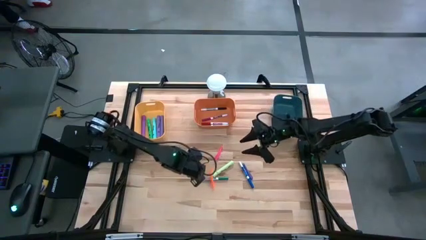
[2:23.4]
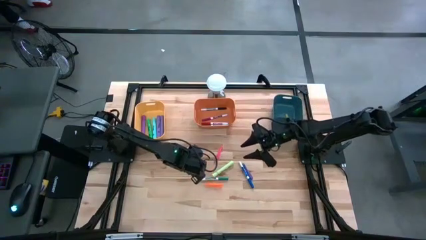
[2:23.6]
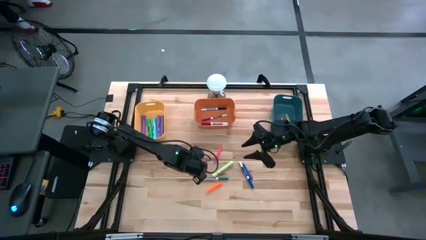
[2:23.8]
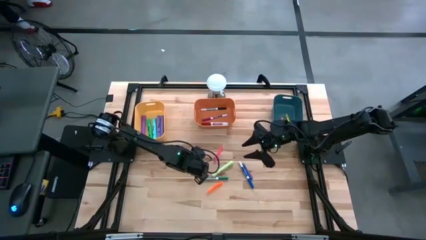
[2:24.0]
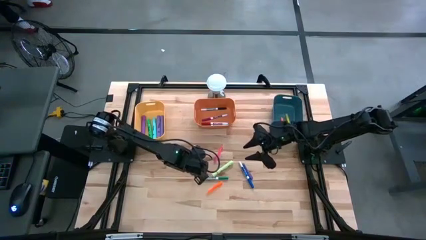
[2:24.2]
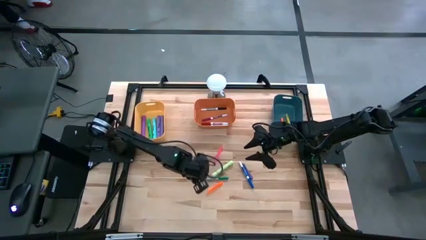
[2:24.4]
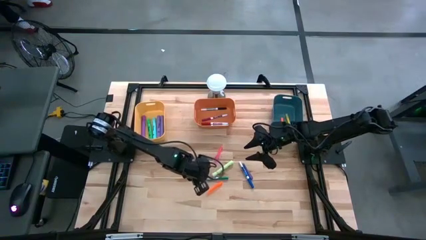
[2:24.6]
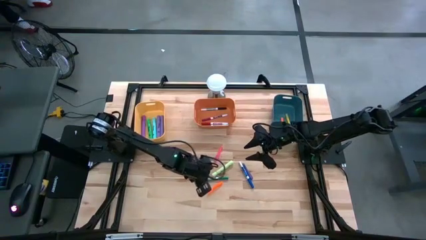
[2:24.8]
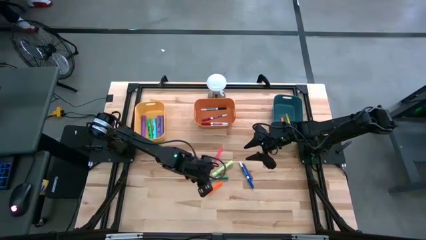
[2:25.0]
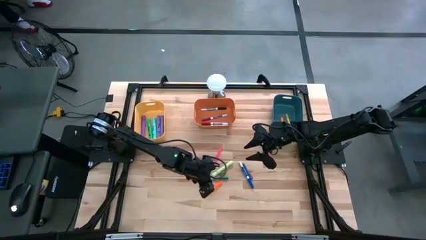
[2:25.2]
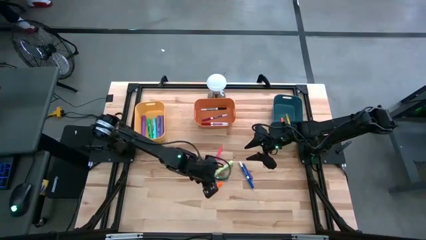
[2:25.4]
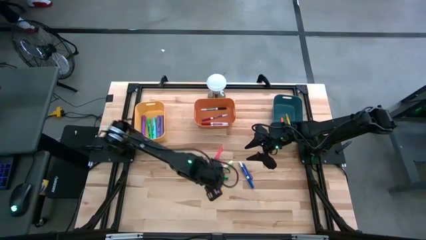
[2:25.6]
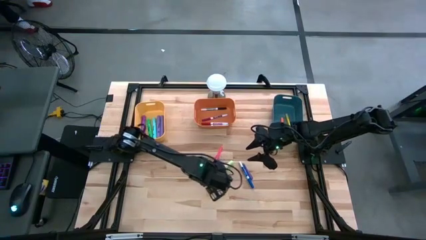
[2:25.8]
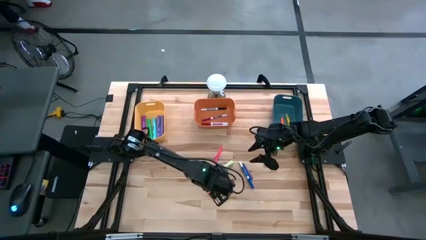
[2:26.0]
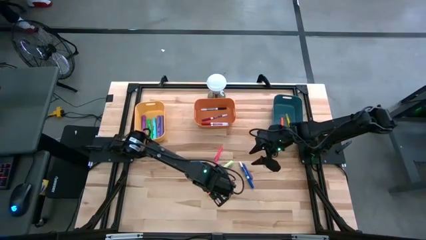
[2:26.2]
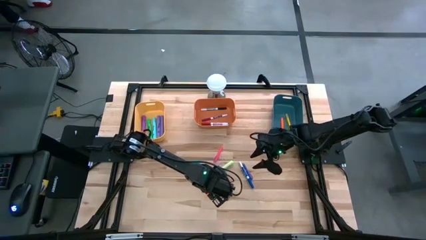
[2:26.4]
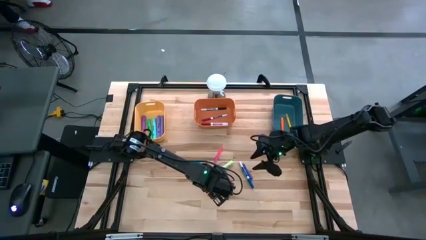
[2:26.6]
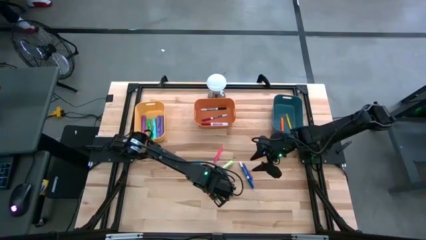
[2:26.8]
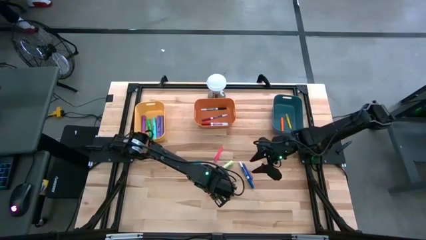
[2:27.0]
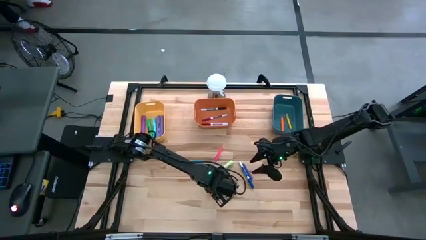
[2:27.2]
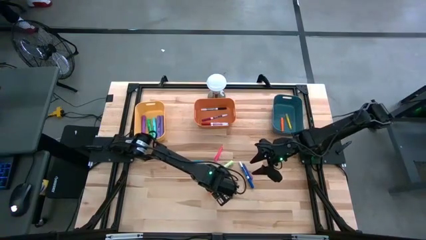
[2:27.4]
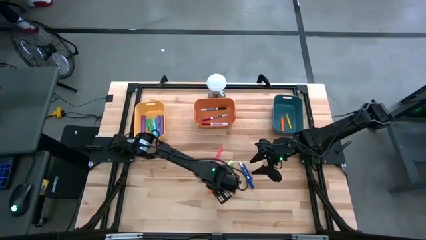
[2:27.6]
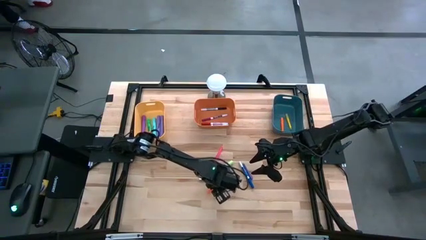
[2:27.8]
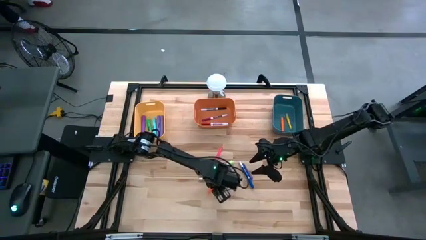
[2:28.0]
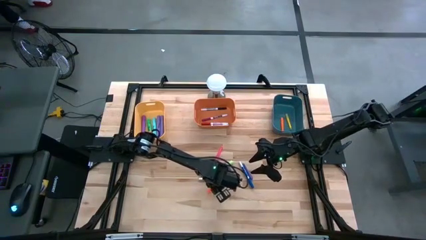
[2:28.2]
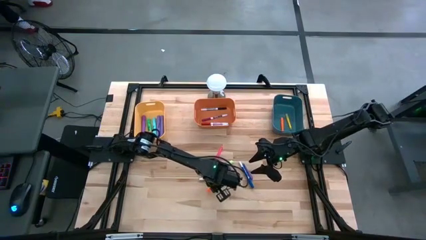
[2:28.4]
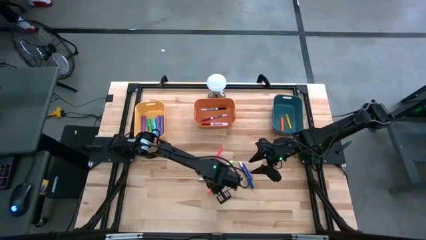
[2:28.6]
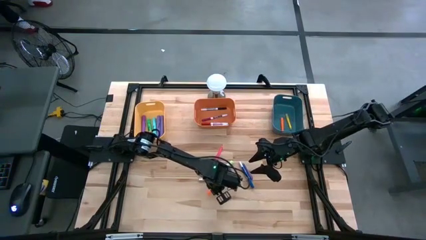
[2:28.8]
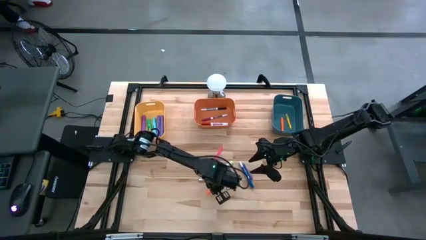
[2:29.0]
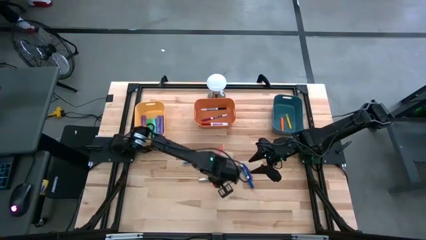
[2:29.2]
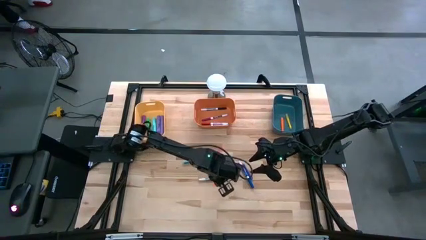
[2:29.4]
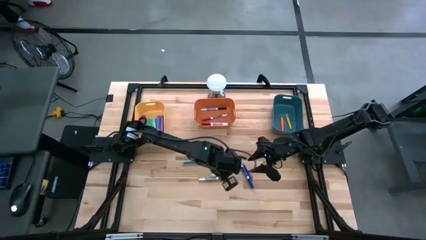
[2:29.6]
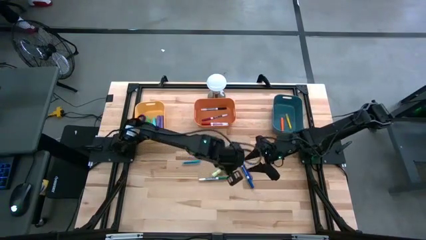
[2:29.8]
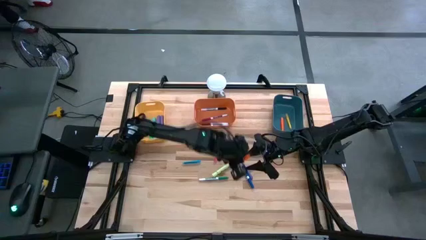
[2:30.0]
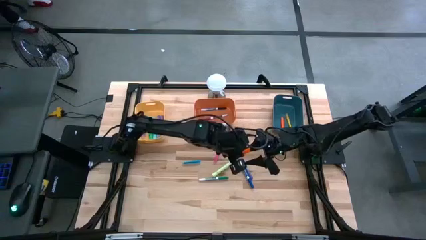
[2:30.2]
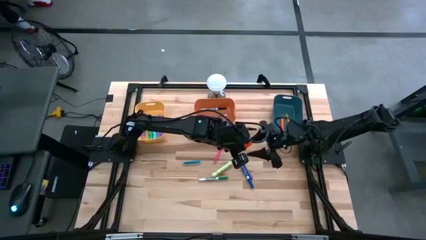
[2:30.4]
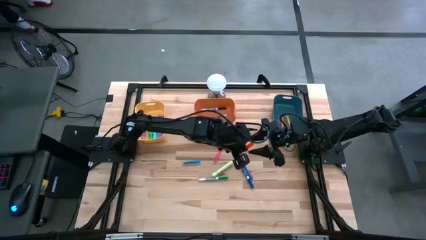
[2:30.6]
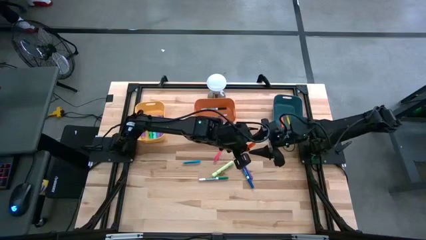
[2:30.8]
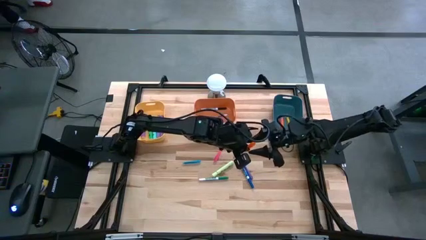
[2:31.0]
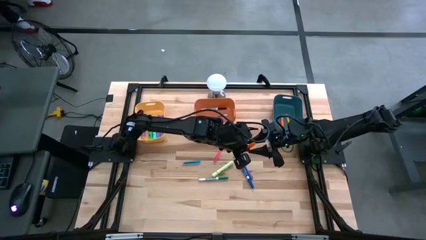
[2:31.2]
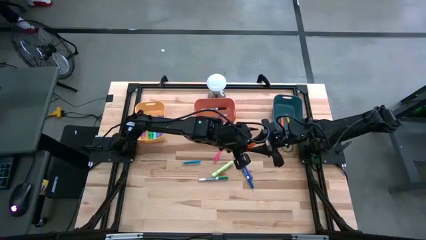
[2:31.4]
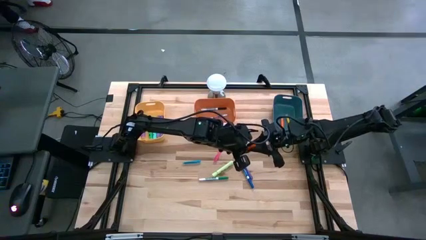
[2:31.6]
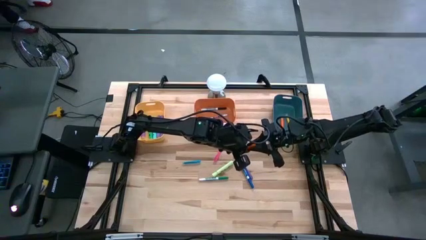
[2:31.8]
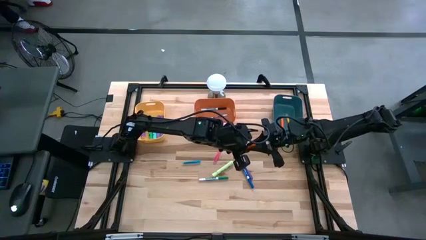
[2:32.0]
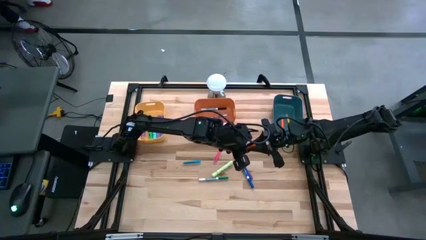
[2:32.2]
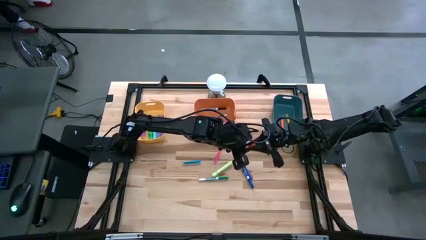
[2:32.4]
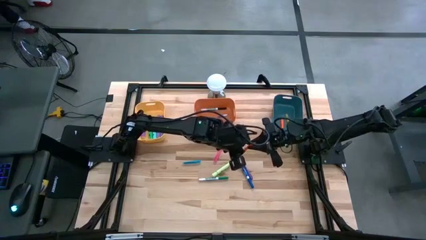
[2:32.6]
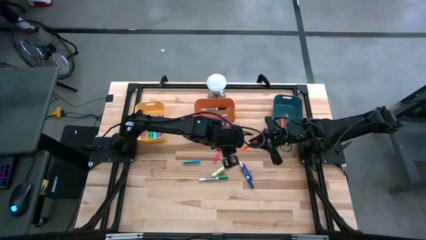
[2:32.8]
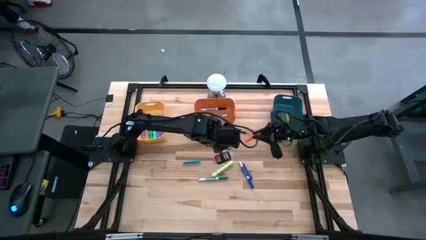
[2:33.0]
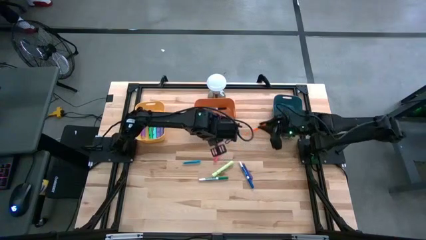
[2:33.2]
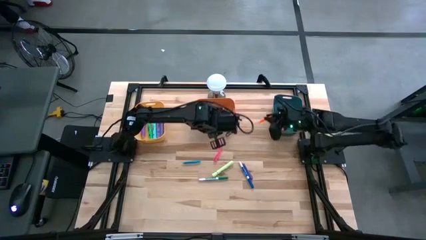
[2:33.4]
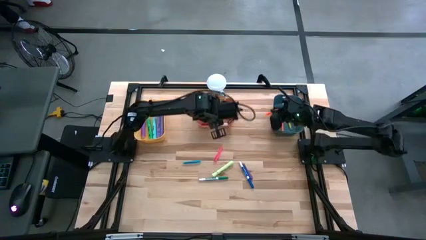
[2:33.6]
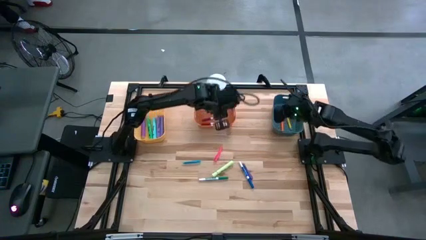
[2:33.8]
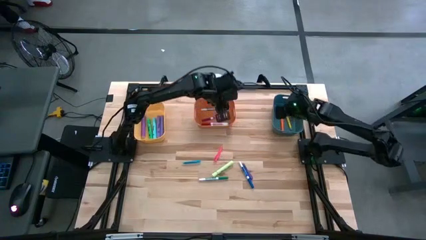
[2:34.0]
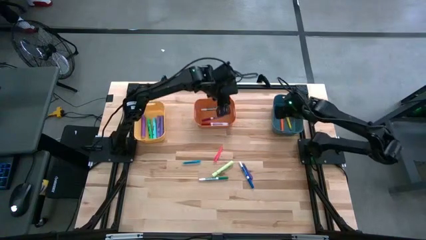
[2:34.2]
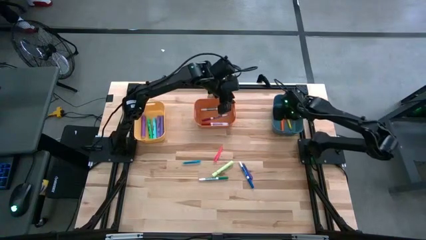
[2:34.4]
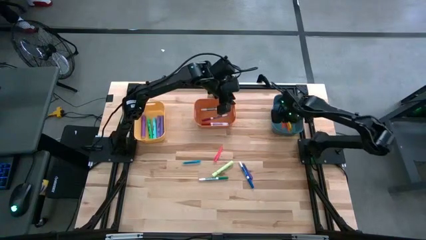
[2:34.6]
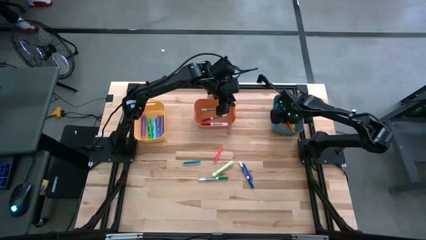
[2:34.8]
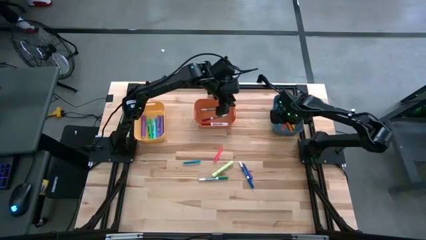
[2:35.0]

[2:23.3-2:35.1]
Task: Pick & Place Markers
Put the orange pen into the blue bin
